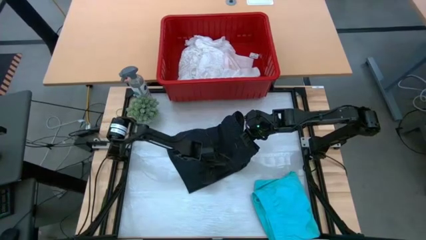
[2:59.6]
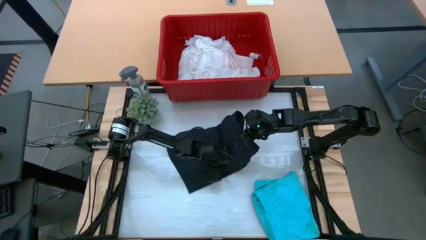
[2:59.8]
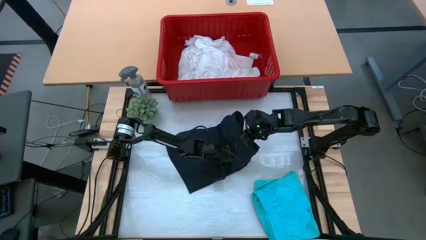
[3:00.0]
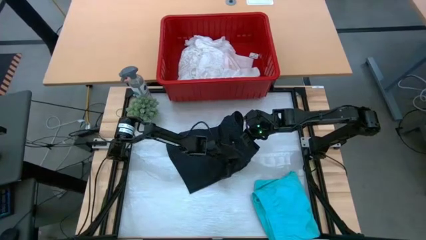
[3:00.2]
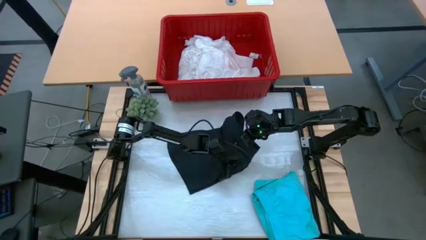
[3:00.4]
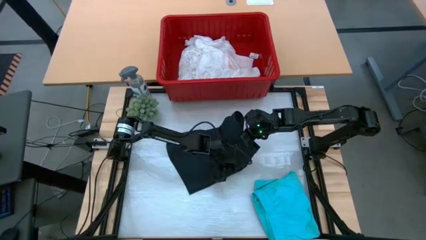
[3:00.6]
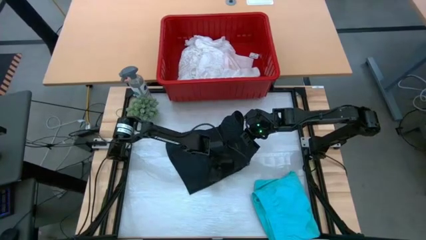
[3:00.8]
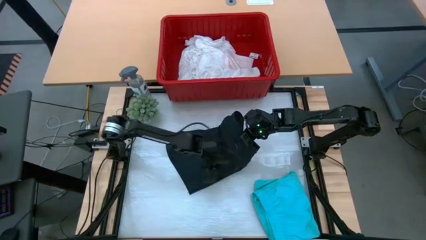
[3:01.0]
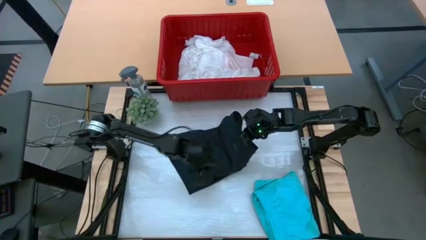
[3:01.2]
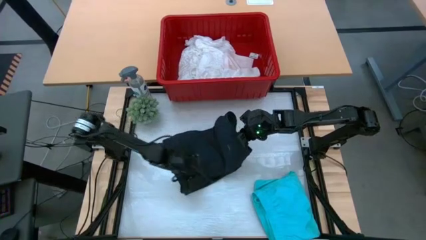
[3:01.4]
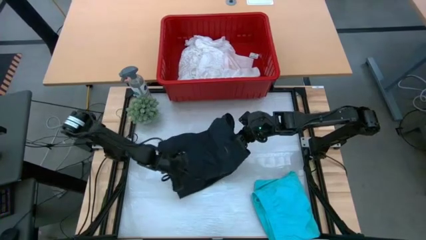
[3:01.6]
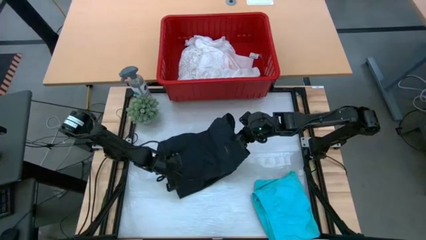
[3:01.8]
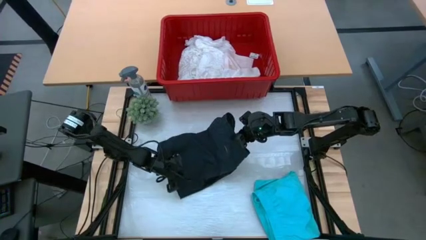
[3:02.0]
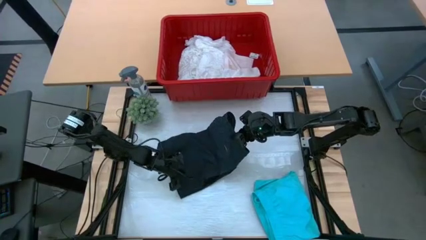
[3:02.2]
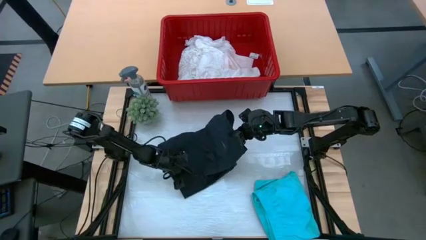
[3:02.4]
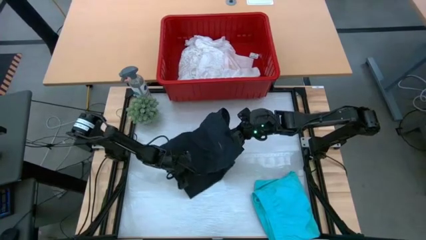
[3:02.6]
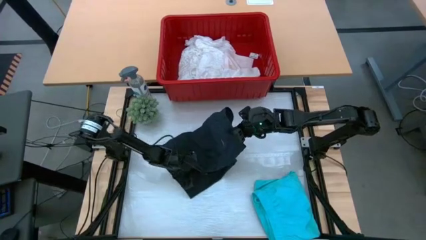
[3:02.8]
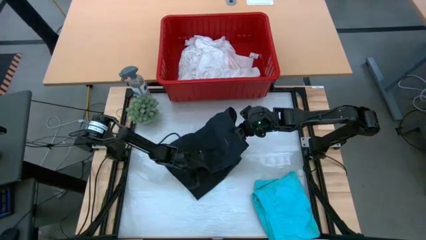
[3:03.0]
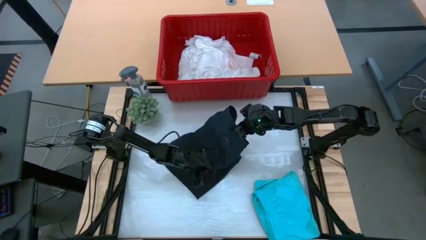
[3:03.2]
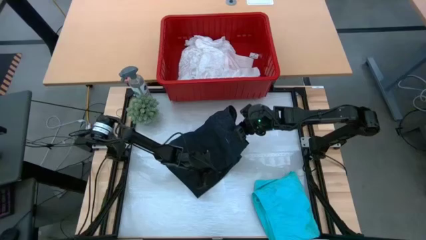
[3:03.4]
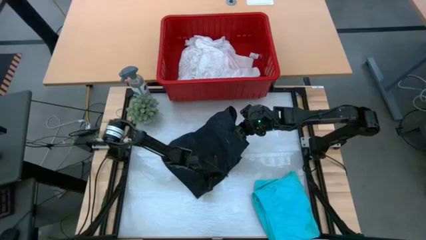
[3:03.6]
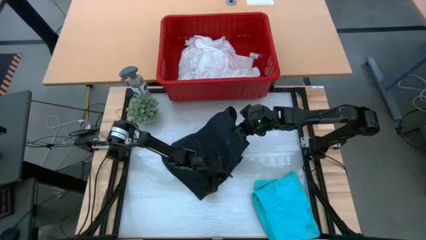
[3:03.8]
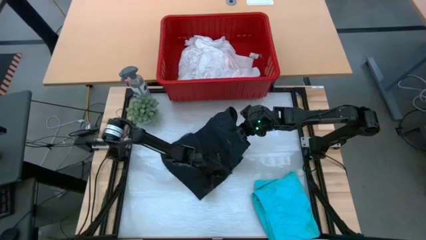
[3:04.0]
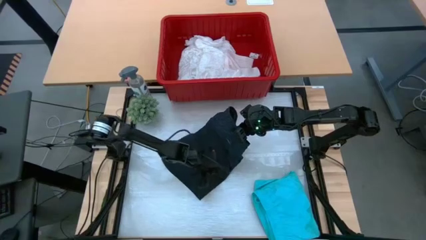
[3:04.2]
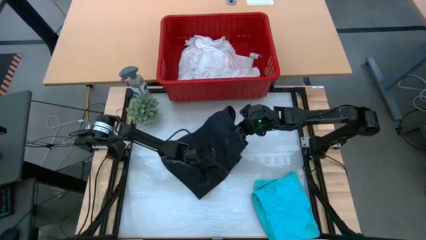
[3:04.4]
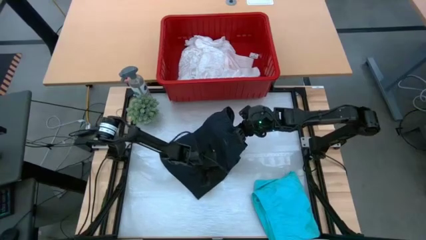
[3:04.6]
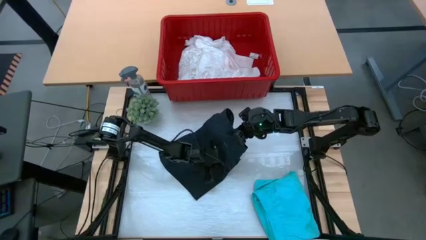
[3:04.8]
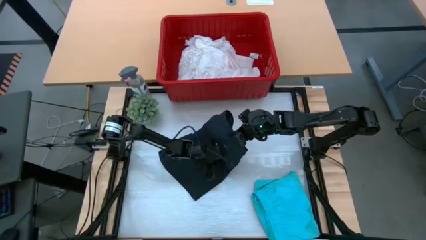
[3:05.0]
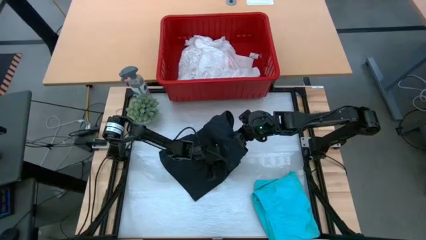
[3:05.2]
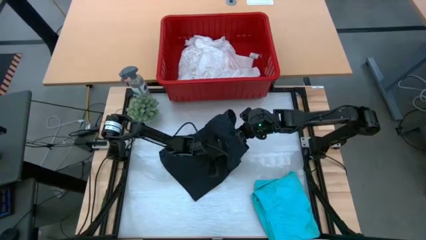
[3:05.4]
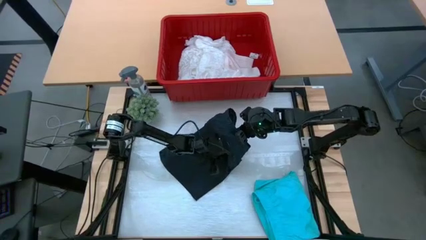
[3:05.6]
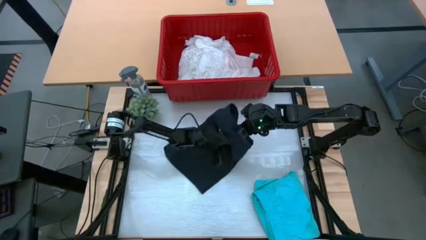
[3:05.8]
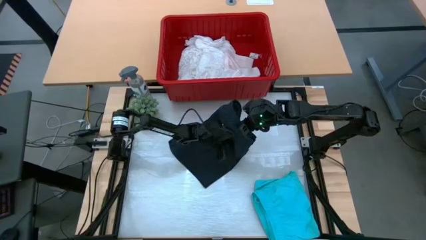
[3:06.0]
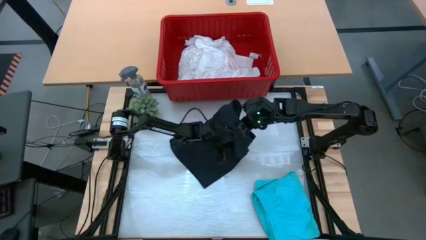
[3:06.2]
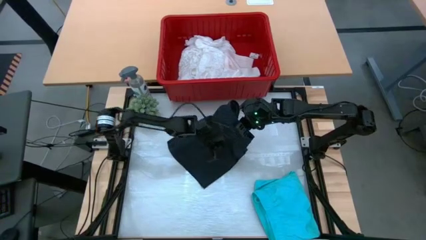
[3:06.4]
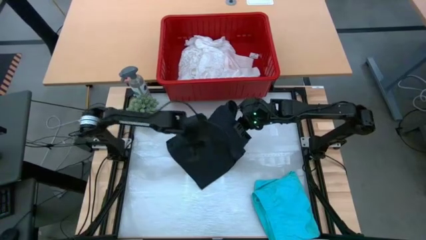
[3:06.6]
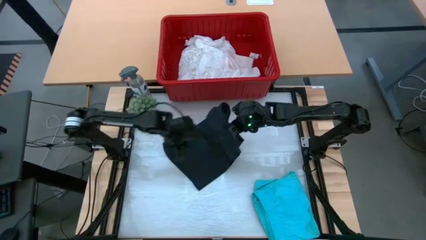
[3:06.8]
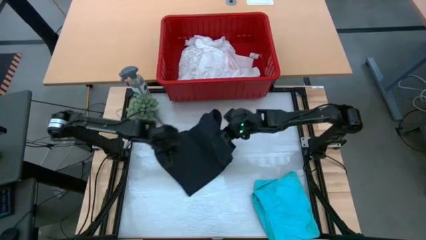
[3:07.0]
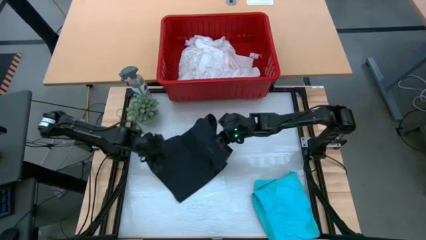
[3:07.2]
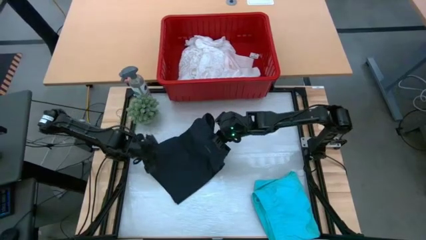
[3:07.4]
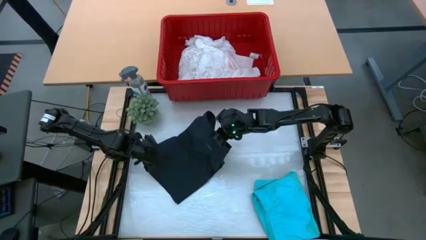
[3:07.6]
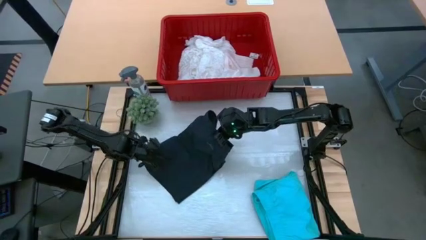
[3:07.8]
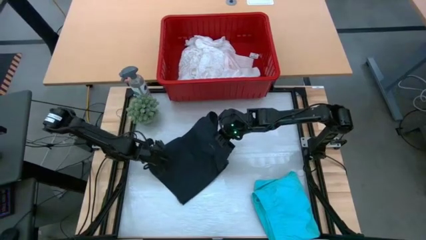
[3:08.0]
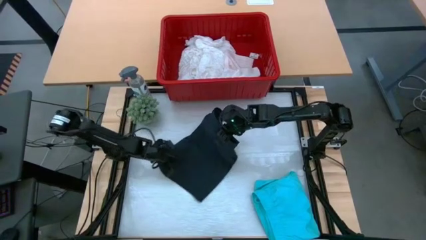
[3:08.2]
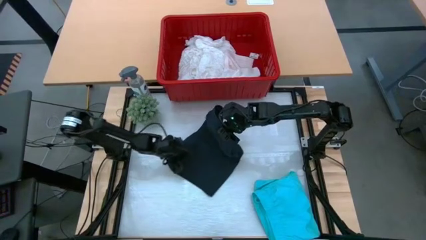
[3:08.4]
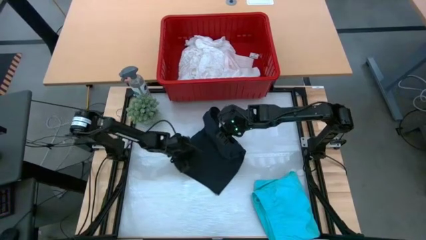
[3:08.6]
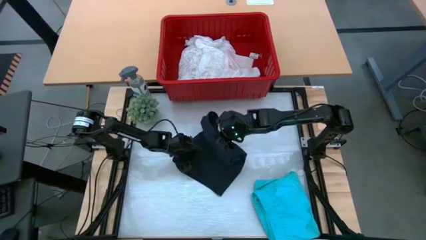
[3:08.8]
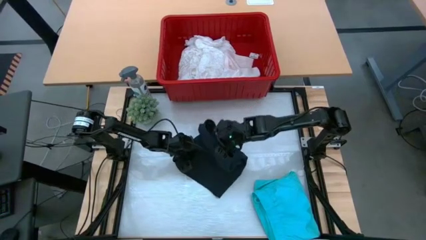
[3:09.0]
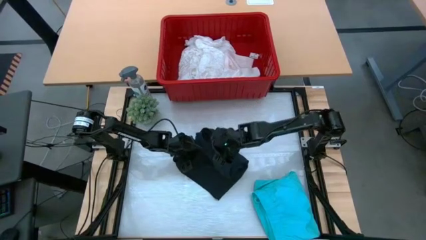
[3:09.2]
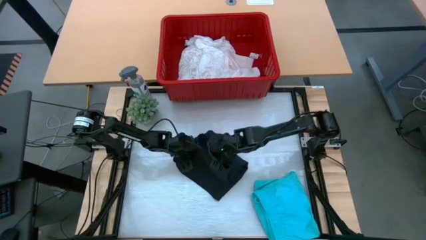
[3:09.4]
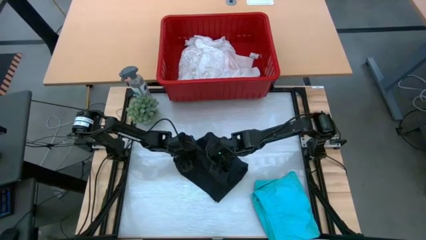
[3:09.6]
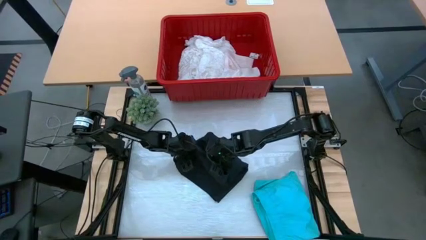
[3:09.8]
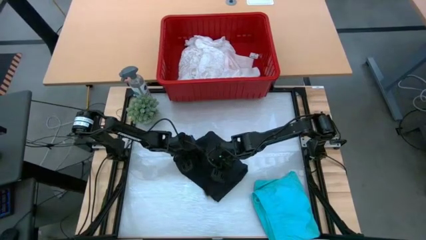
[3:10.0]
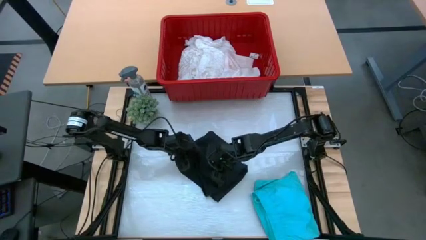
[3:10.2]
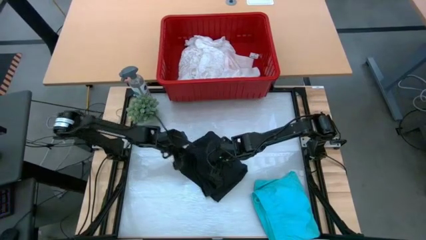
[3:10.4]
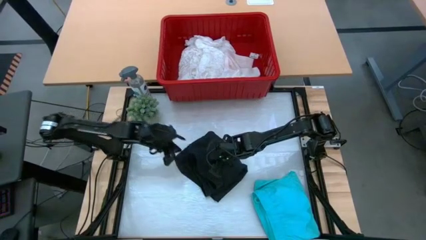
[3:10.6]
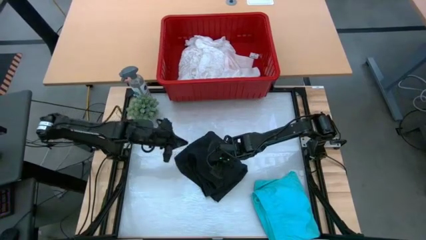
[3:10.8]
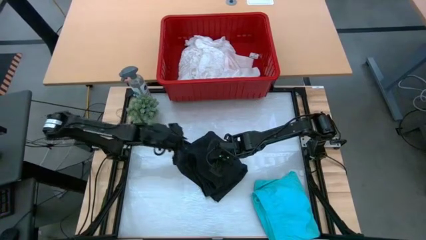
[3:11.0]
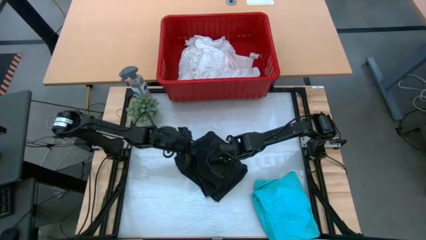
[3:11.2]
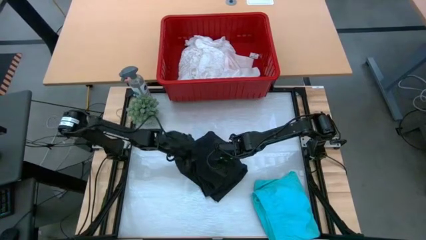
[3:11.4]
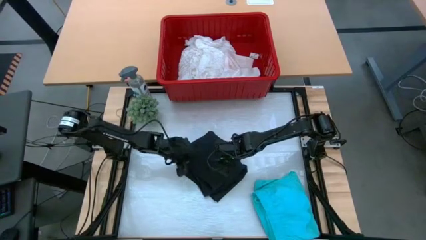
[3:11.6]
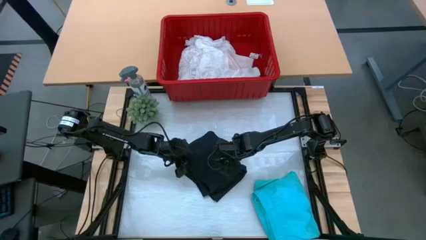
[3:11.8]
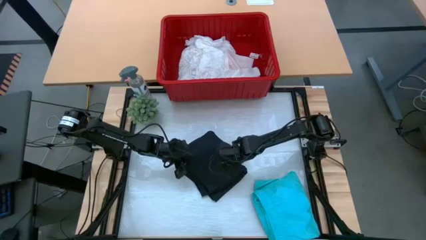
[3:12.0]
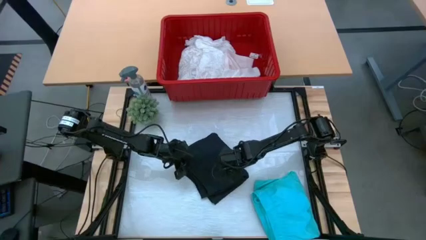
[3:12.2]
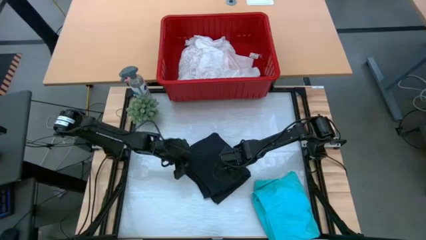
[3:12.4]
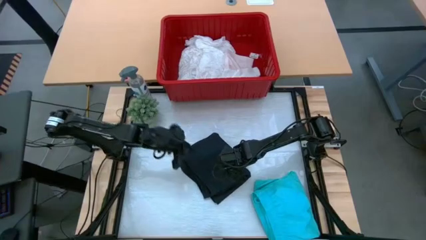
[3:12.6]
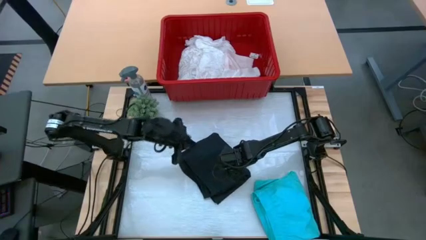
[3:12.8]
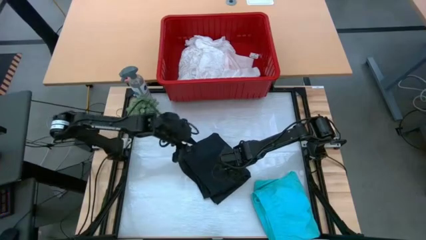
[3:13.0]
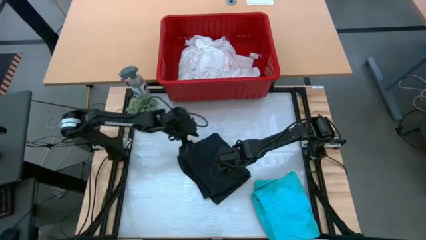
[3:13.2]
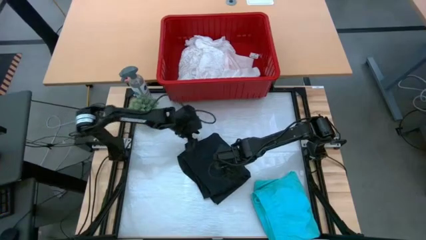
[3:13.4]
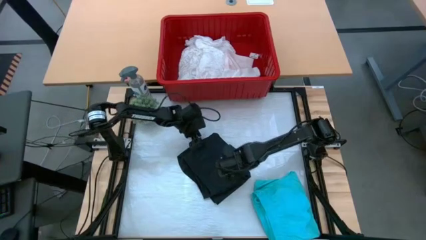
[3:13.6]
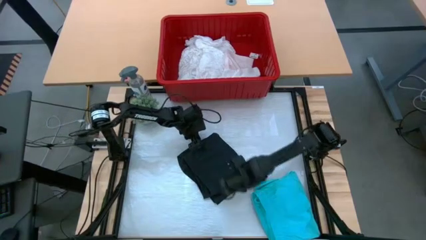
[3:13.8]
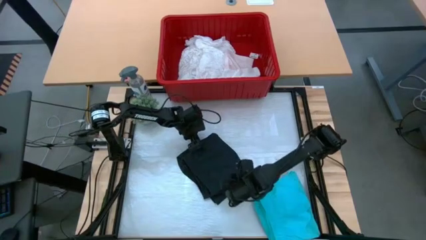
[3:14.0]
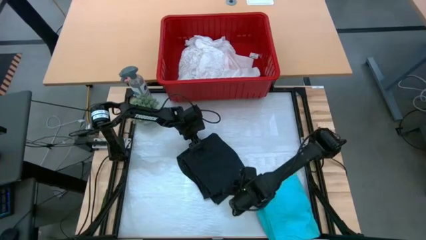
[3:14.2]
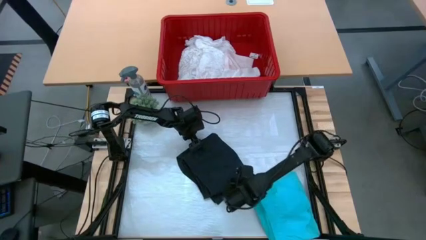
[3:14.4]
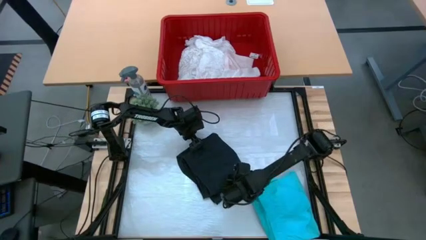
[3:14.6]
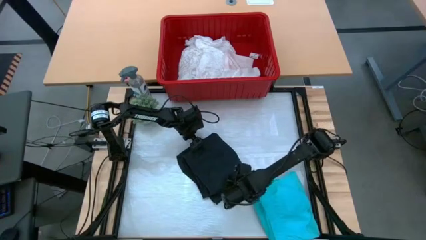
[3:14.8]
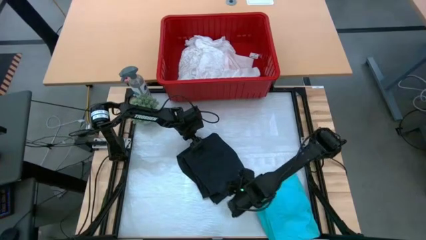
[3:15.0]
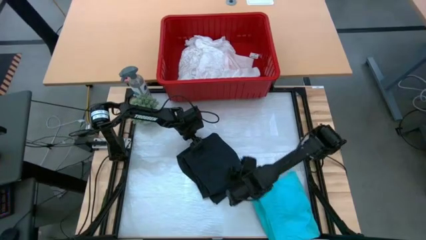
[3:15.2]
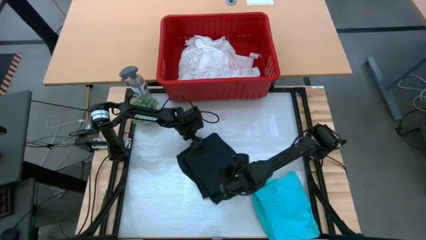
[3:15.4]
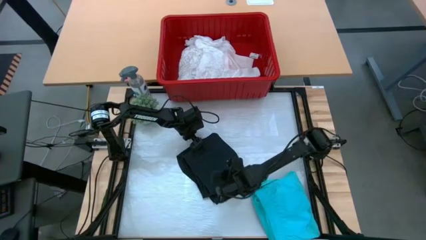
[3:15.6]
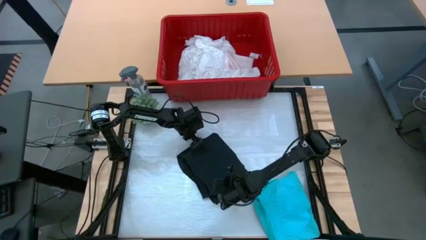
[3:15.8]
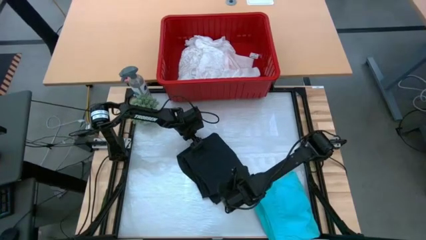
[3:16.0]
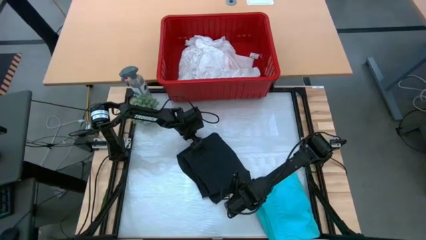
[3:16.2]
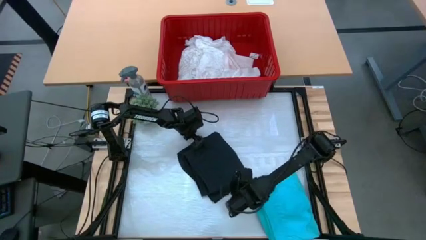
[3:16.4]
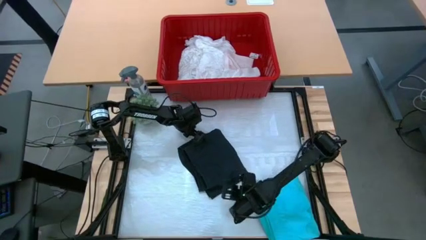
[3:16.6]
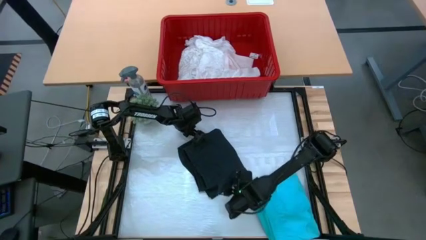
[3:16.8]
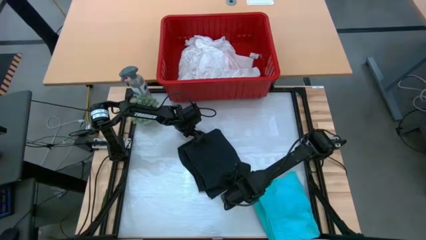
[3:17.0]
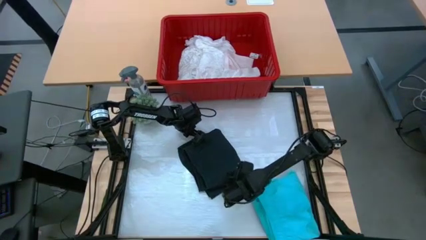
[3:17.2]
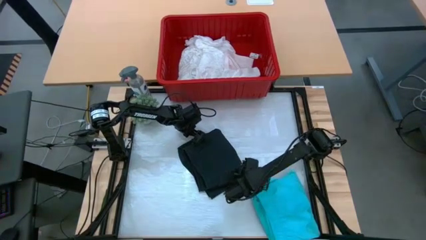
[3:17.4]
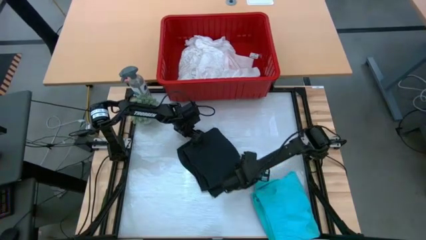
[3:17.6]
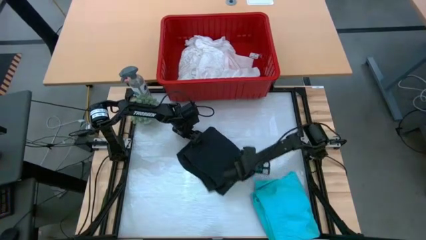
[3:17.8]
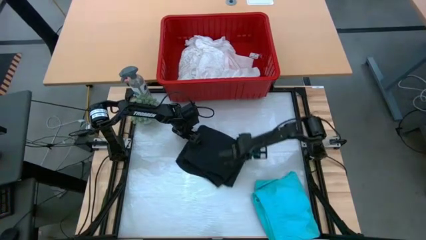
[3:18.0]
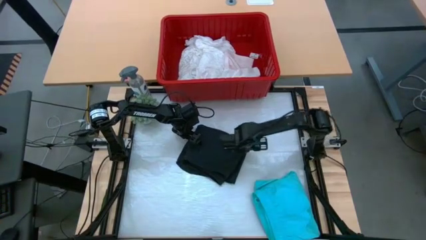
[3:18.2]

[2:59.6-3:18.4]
Task: Fold Laundry from Bin
Fold the black shorts
